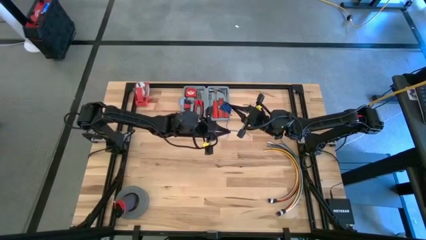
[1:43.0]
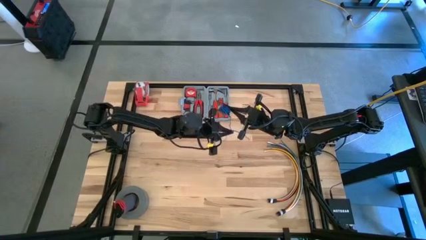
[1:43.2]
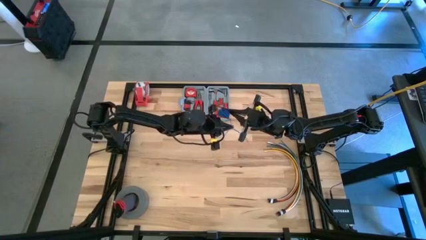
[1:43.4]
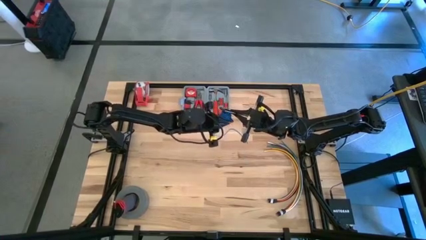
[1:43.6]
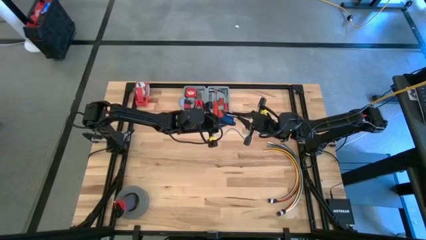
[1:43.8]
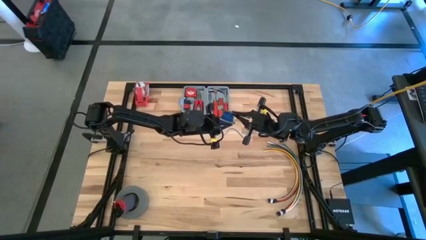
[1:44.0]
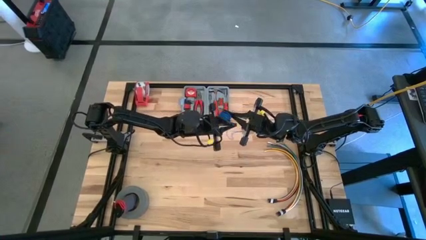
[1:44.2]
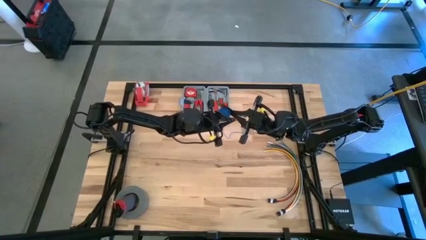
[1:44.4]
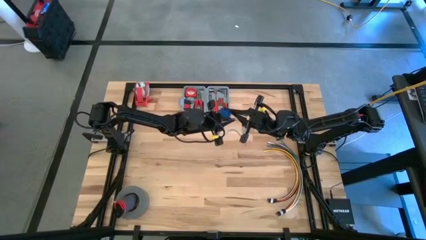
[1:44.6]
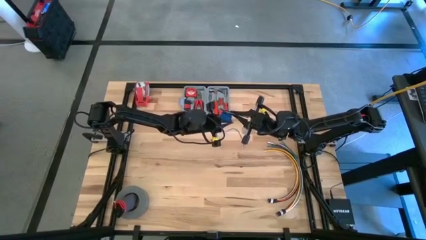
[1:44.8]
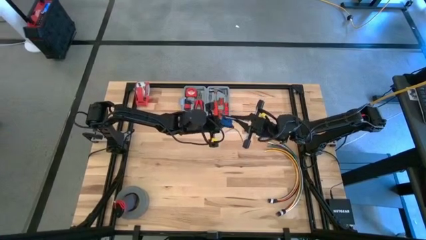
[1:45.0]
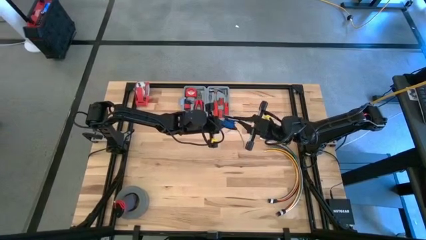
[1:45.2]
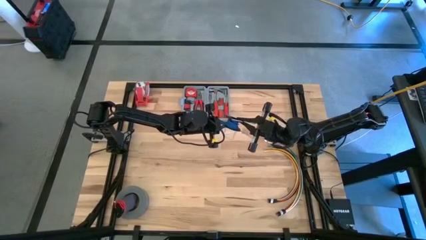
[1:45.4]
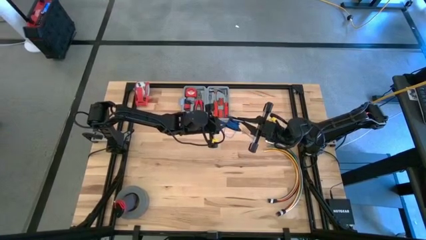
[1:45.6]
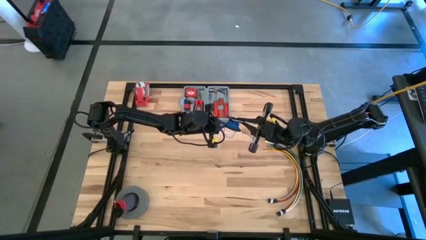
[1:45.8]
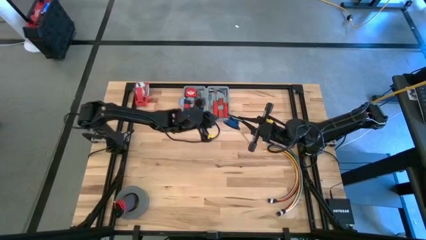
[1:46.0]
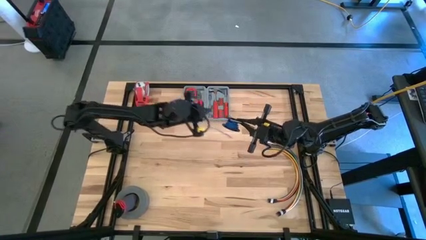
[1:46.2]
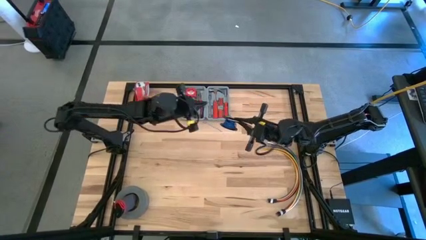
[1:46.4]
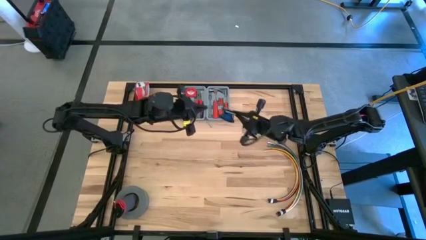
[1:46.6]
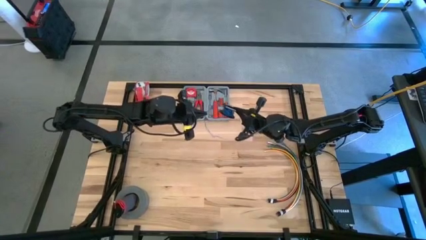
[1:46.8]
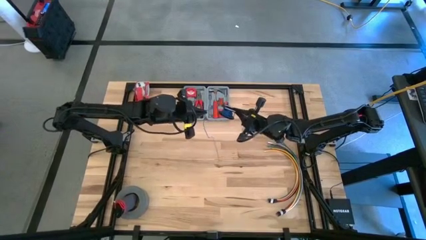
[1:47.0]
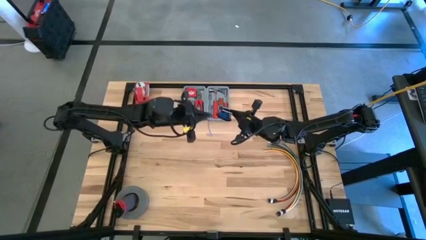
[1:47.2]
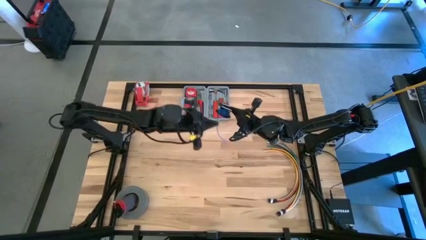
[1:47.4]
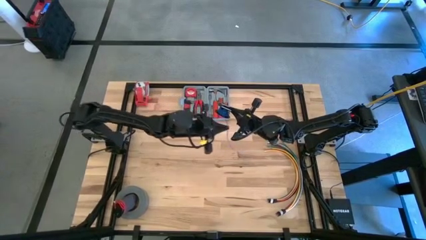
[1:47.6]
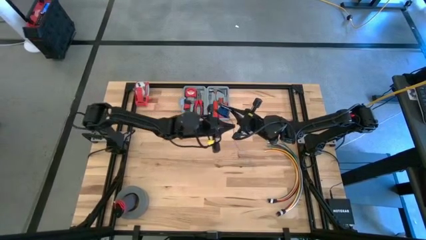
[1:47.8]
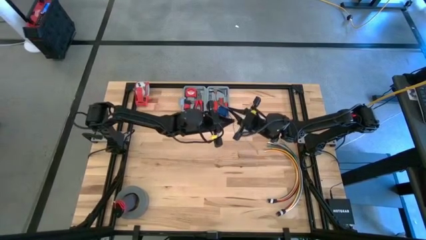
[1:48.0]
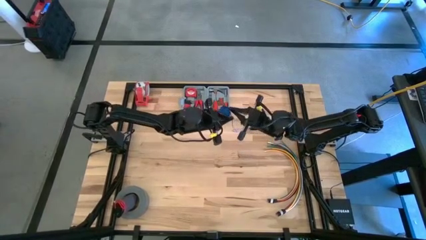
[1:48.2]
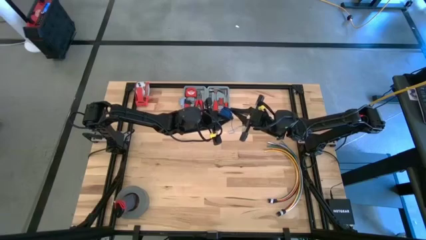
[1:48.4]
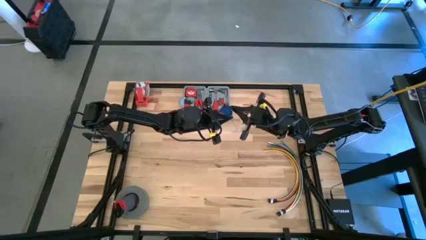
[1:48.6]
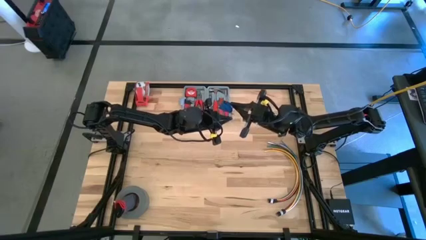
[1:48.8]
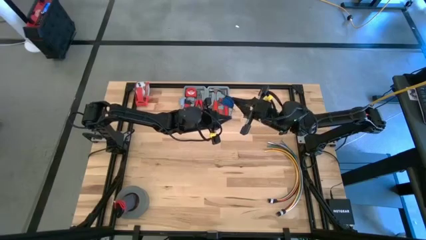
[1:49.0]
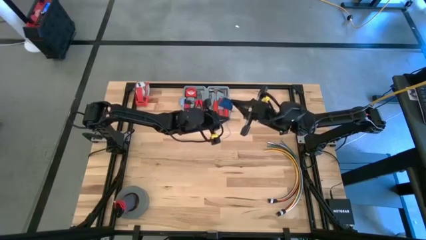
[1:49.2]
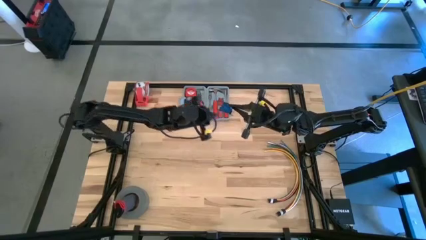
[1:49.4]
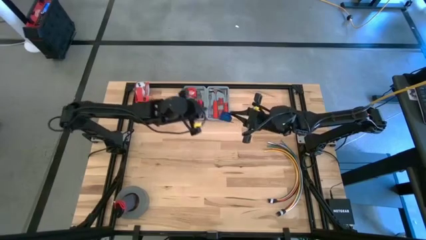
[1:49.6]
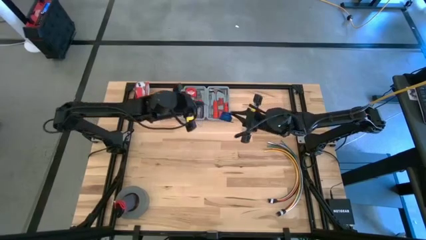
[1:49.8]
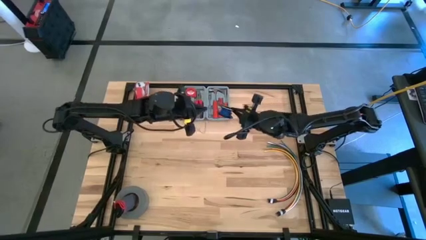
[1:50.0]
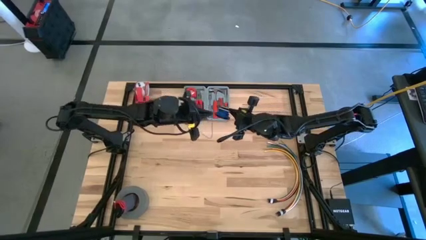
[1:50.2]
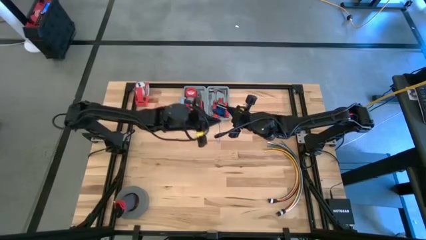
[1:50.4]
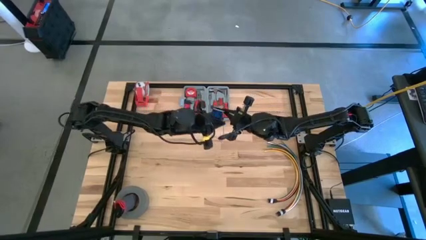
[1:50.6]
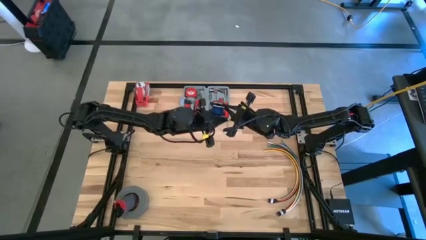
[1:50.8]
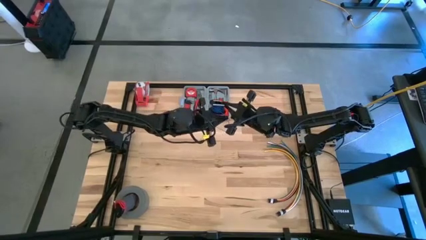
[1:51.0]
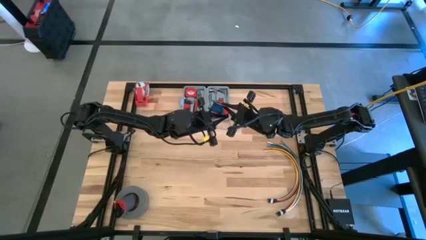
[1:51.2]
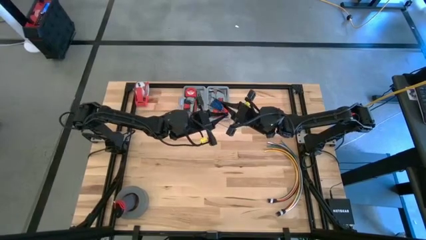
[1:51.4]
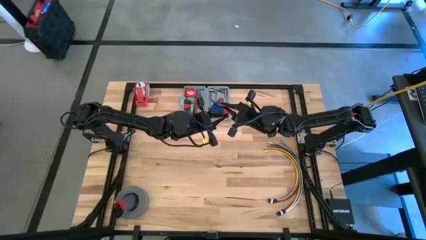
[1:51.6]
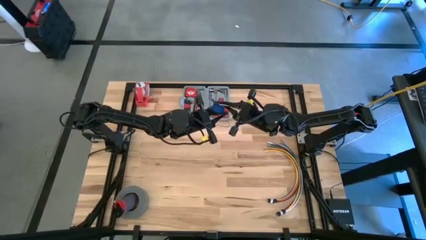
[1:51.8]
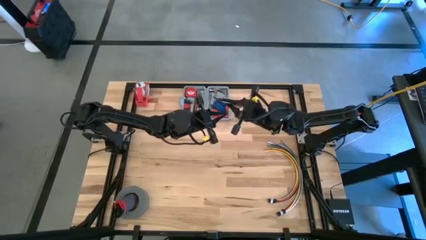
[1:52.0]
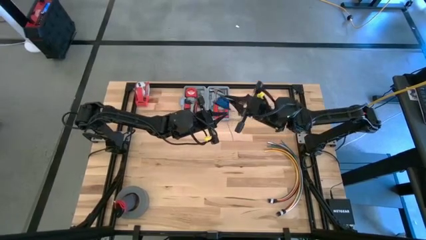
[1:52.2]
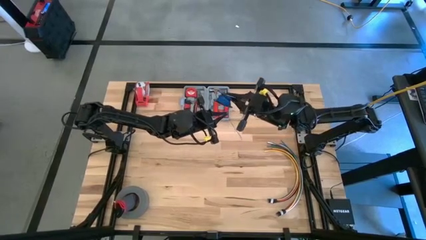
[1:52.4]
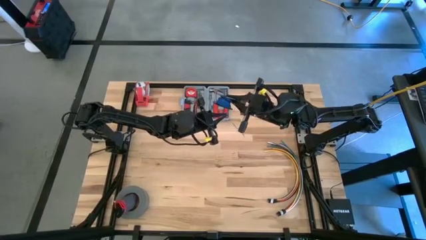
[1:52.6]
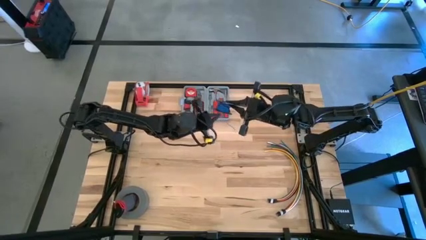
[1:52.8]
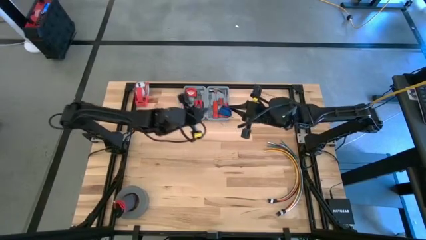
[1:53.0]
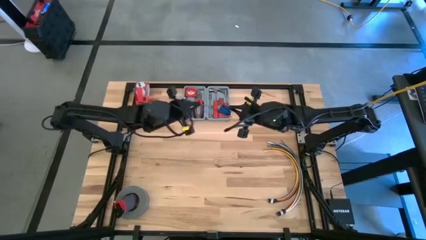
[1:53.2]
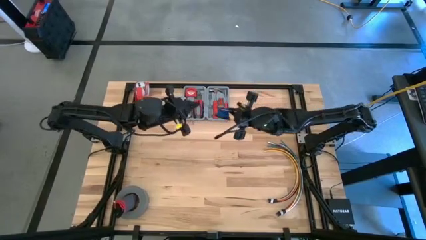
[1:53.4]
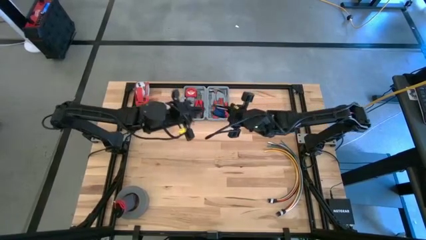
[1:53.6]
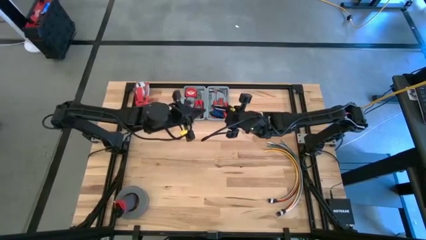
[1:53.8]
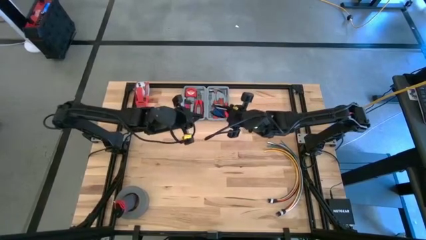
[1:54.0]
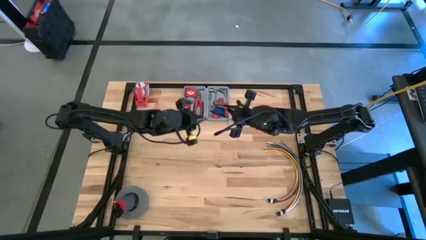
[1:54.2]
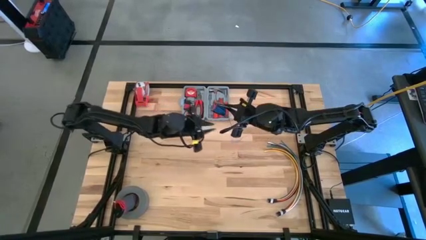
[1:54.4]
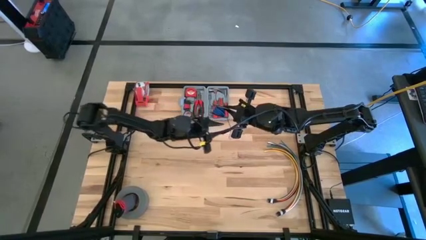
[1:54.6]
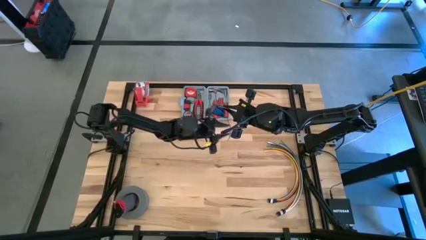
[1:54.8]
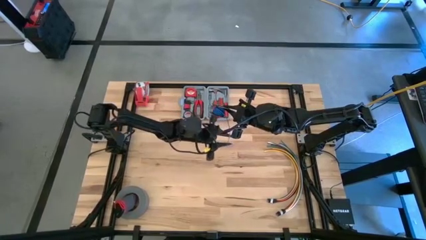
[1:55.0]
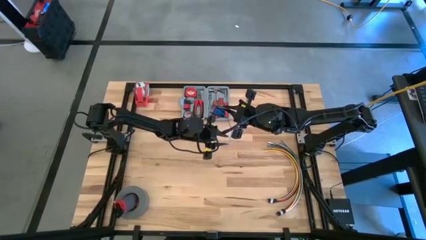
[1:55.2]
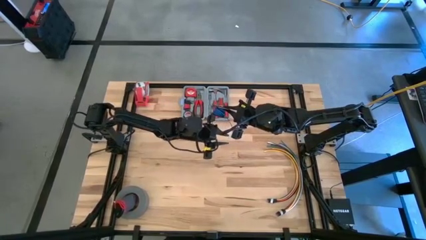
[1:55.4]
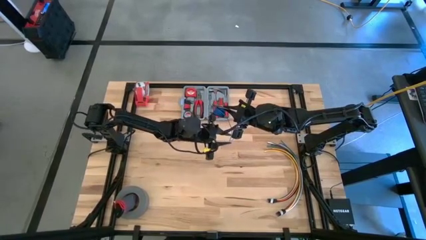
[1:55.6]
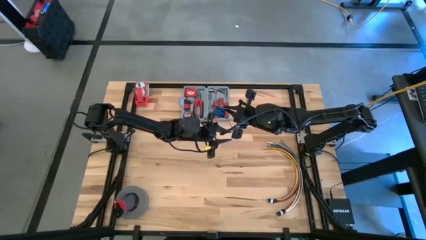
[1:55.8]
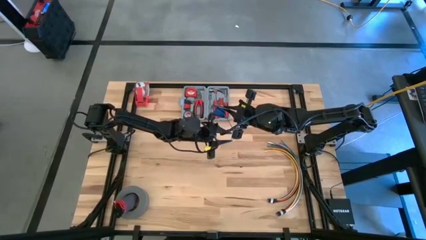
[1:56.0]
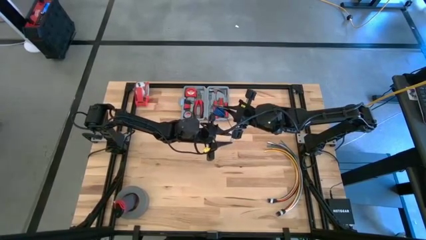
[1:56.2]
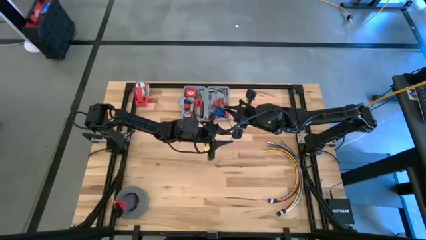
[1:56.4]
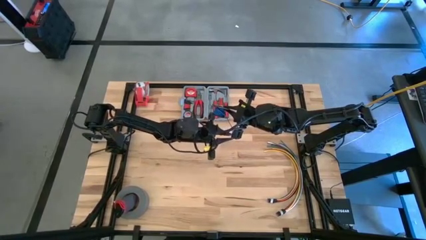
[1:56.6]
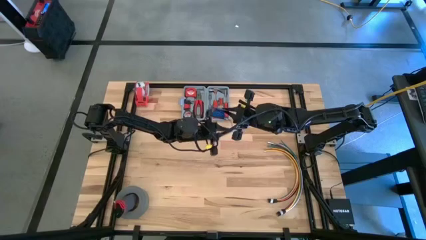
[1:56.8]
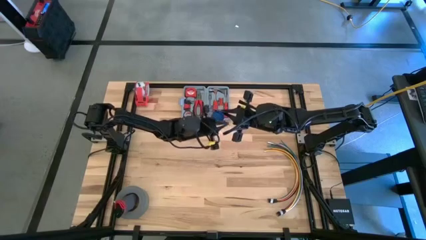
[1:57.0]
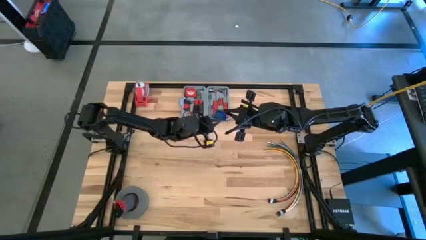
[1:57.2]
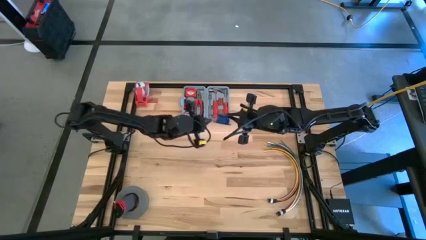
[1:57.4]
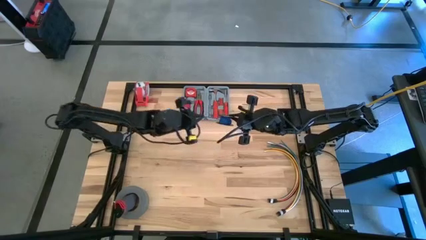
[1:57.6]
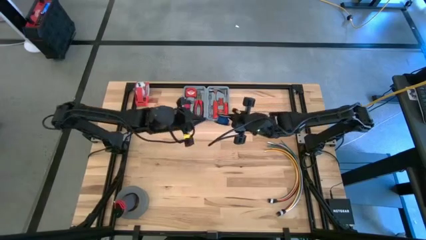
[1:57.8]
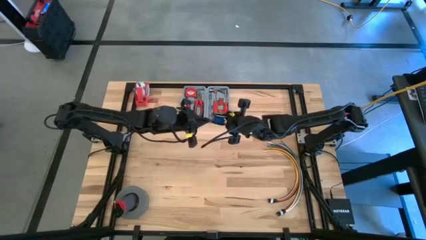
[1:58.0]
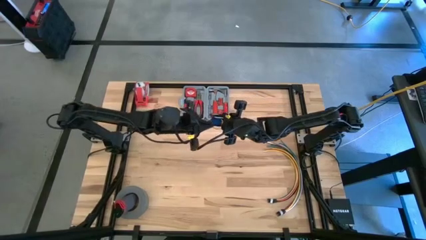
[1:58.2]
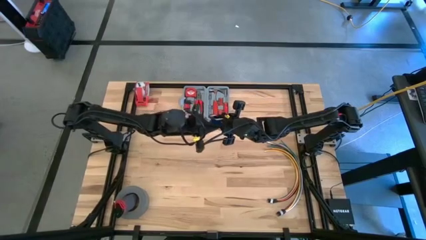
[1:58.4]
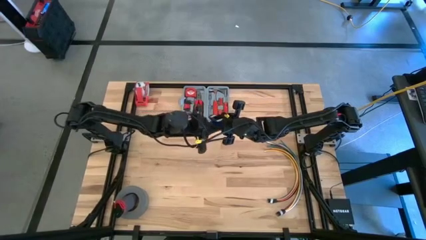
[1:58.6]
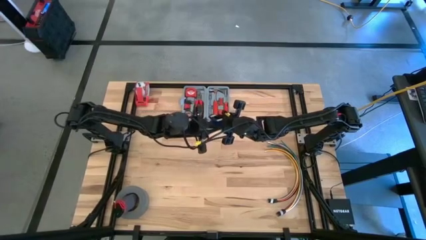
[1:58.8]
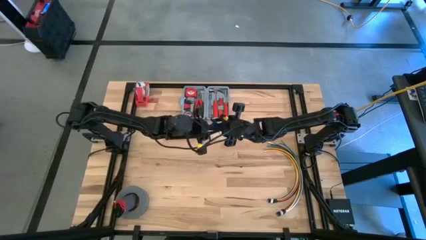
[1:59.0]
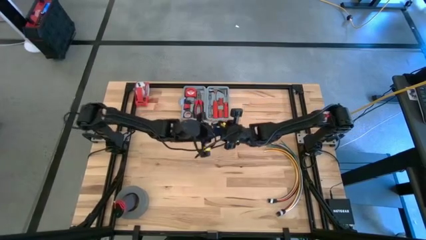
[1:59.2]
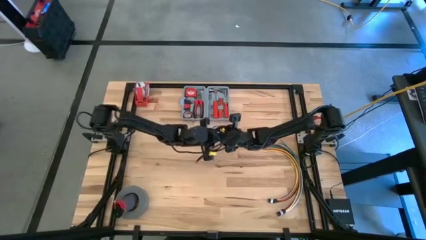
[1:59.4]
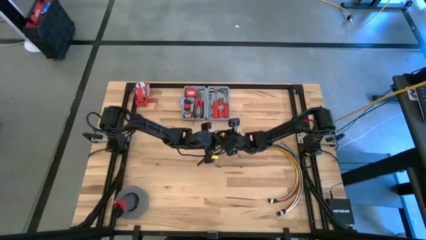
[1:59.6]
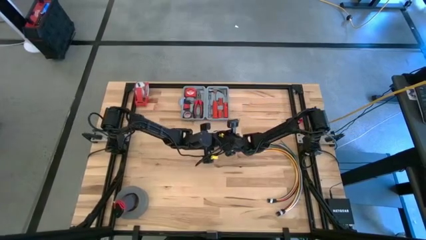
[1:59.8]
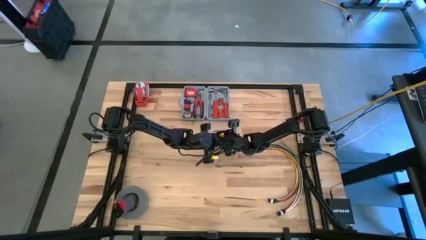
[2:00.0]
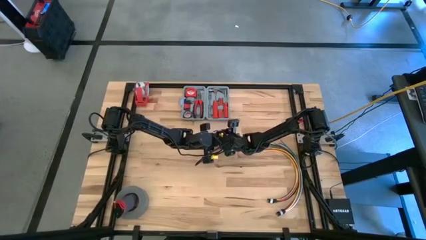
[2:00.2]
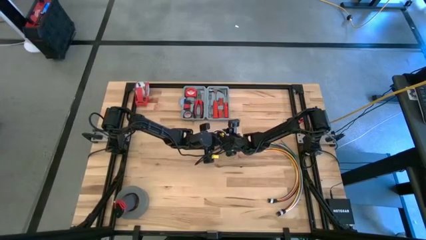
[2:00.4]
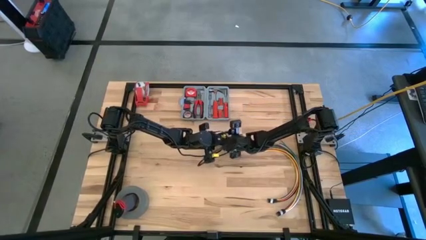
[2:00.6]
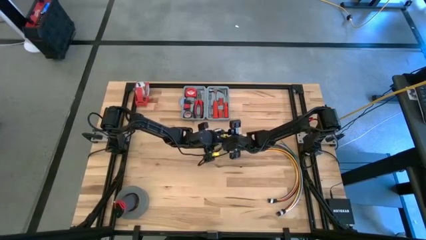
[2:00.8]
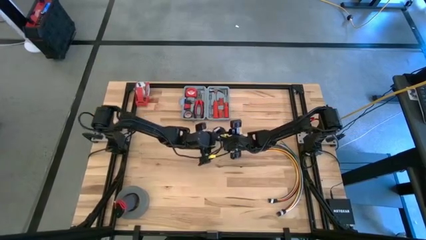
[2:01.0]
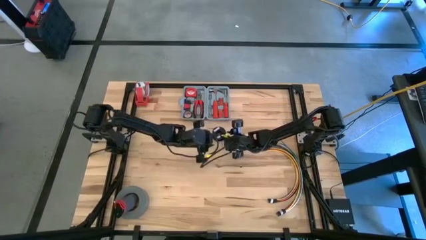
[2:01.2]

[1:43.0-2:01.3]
Task: Coil cords
Coil the blue wire into the black spool
